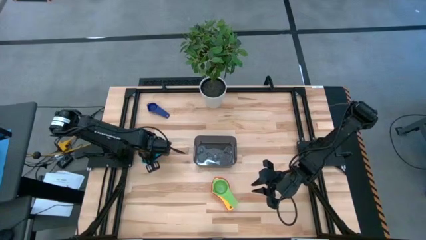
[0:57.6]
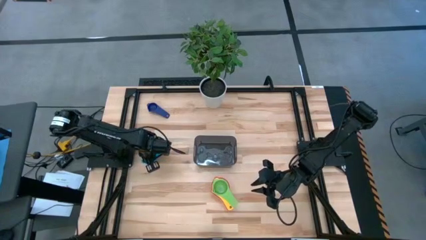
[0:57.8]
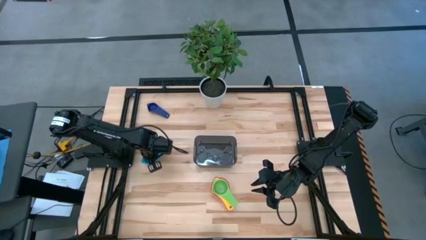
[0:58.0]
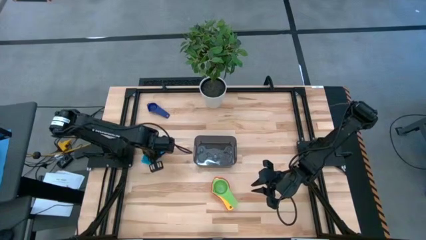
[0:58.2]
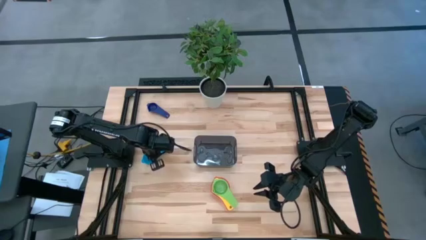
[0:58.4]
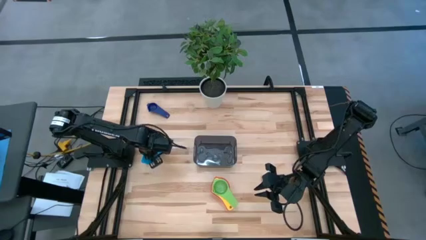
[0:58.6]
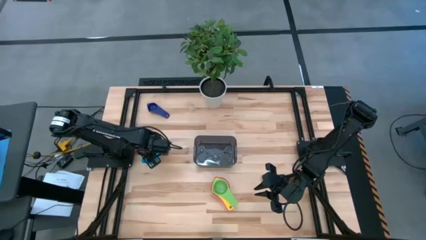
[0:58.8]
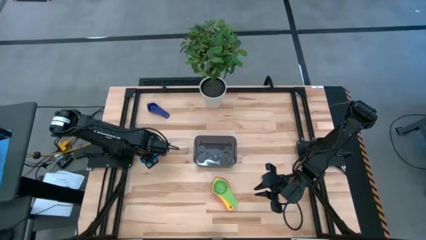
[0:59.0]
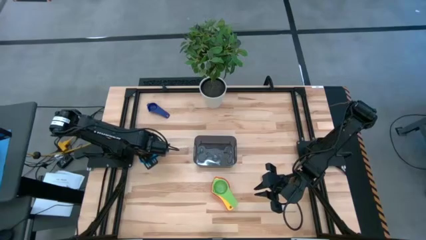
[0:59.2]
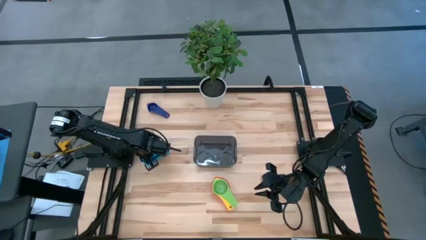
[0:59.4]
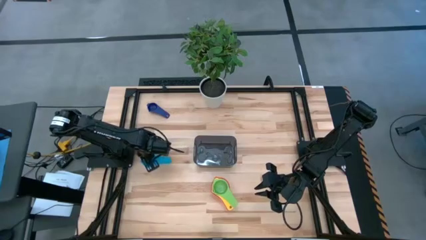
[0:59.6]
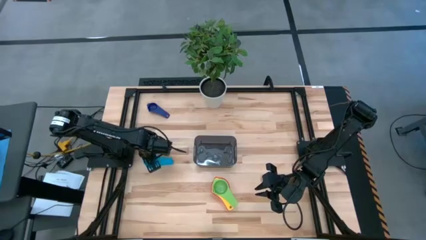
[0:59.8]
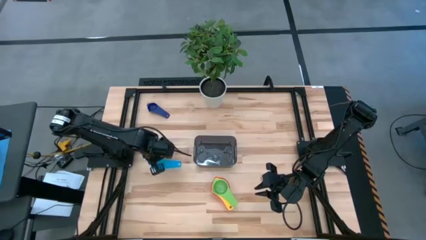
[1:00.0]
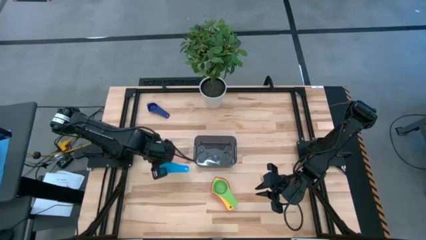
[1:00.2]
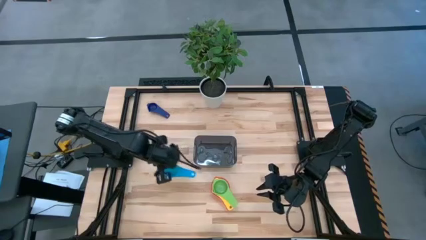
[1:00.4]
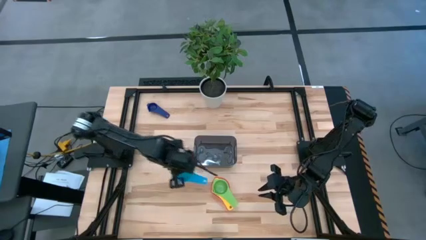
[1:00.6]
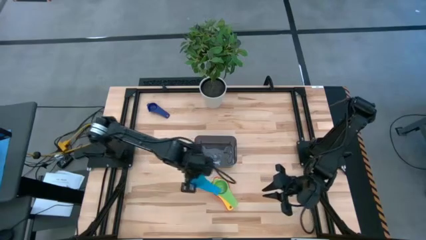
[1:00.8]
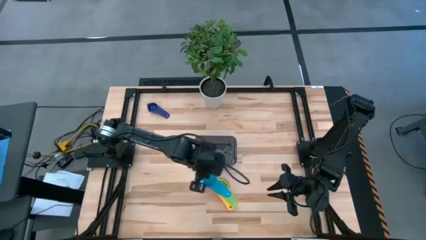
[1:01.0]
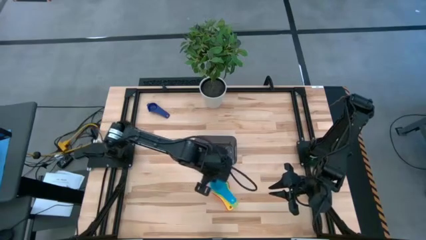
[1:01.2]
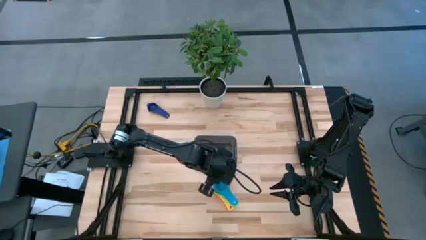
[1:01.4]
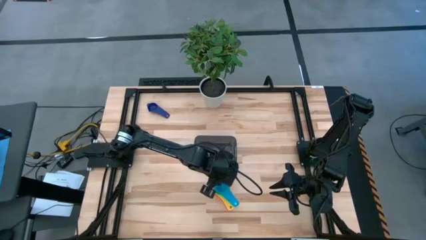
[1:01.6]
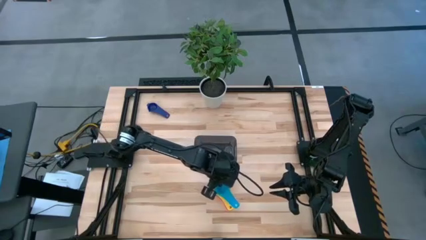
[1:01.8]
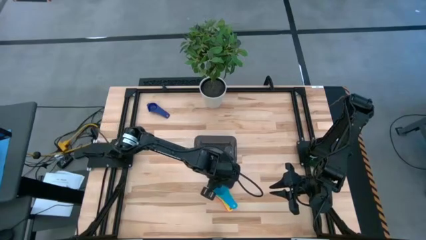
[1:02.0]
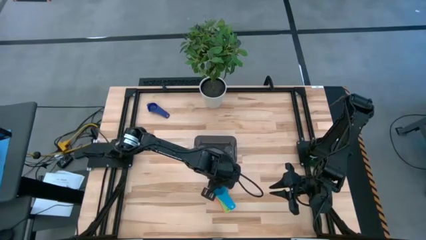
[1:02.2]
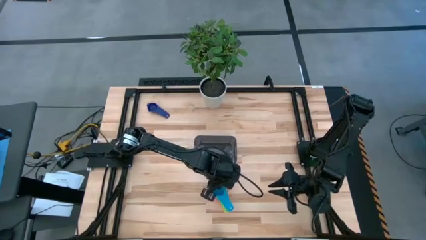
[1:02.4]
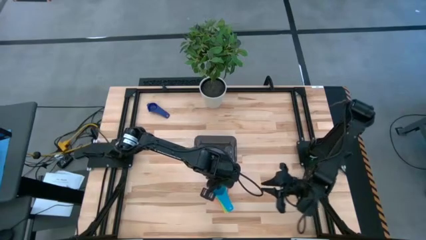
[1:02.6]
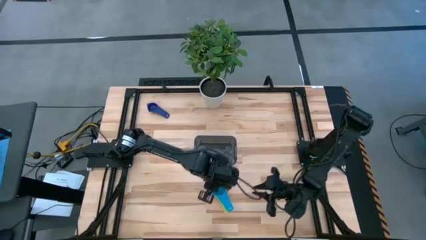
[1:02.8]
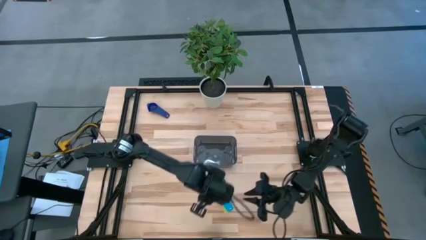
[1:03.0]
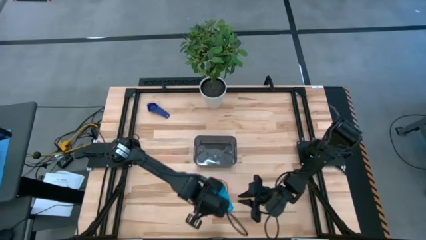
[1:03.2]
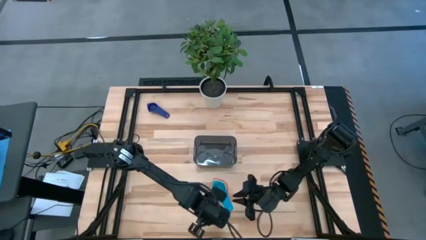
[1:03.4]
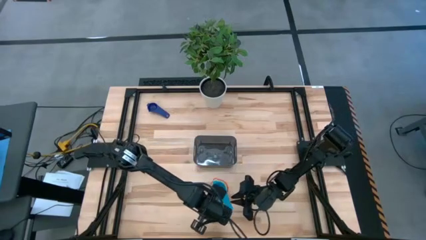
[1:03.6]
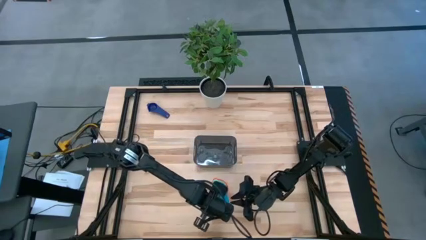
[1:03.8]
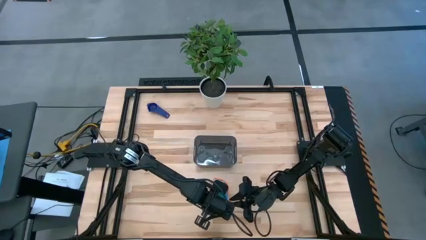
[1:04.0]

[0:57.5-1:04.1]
Task: Nest measuring cups in basket
Stack the light blue measuring cup on top of the green measuring cup

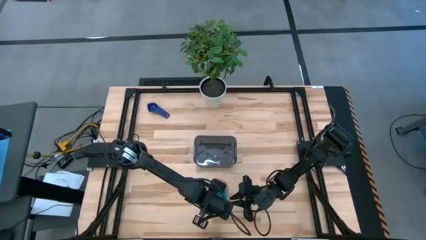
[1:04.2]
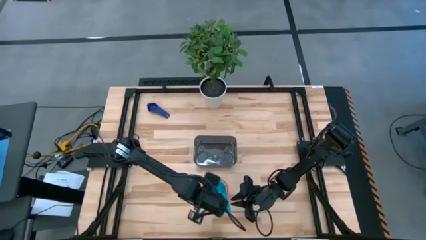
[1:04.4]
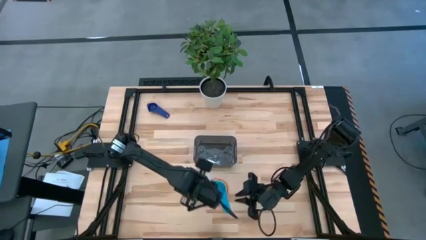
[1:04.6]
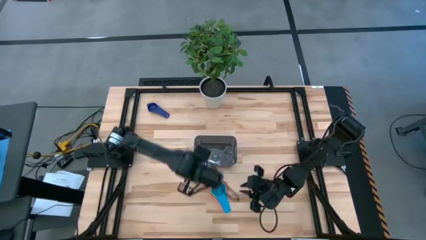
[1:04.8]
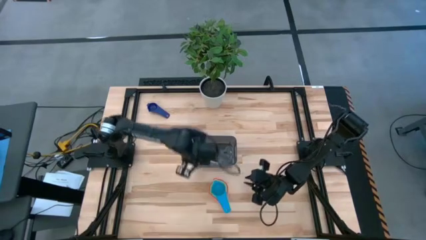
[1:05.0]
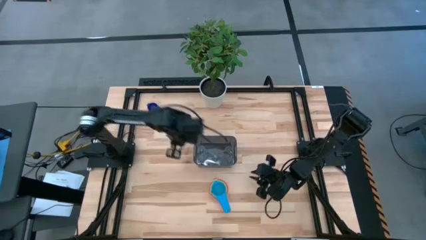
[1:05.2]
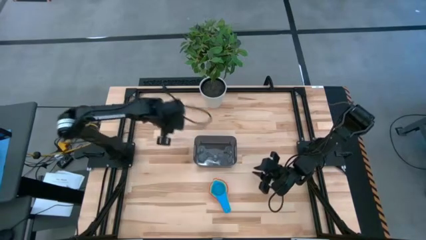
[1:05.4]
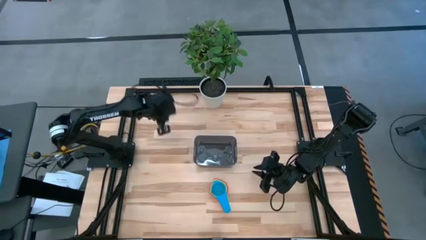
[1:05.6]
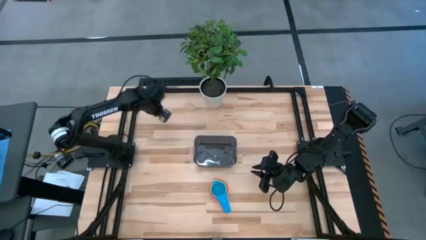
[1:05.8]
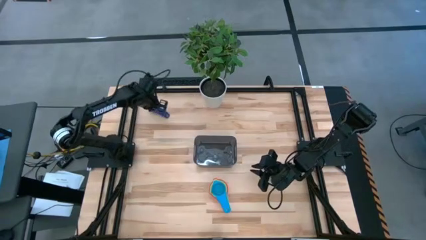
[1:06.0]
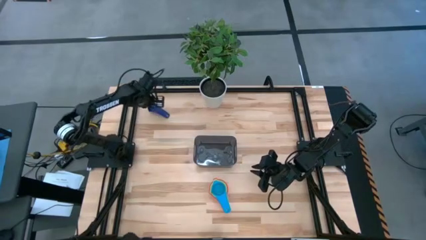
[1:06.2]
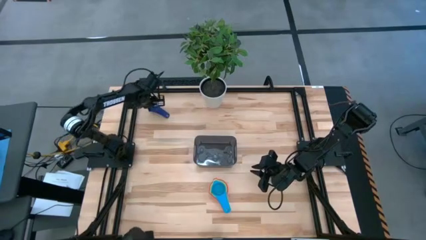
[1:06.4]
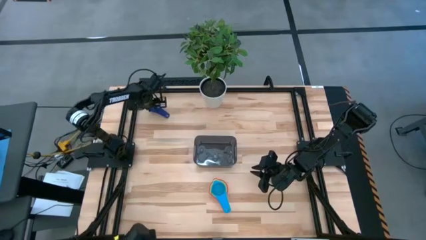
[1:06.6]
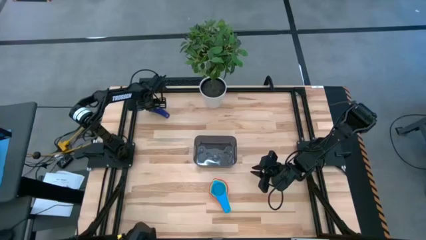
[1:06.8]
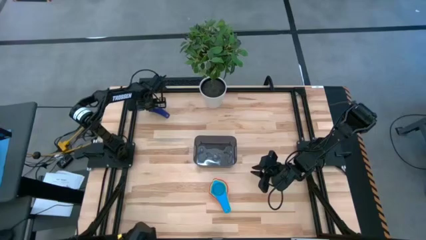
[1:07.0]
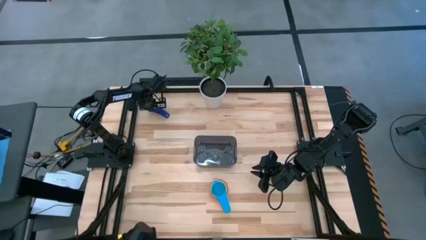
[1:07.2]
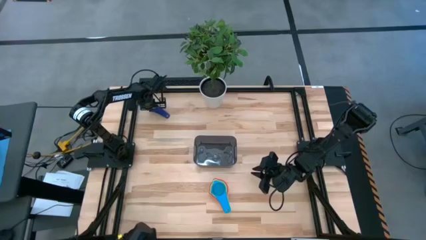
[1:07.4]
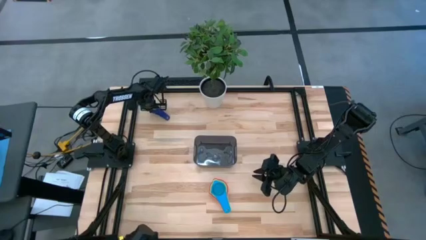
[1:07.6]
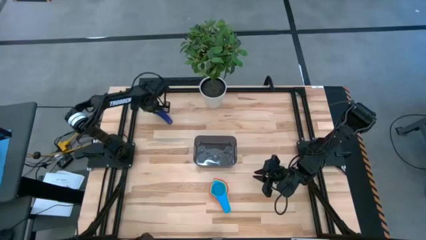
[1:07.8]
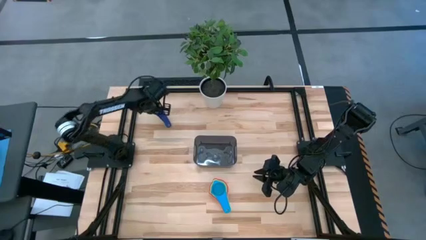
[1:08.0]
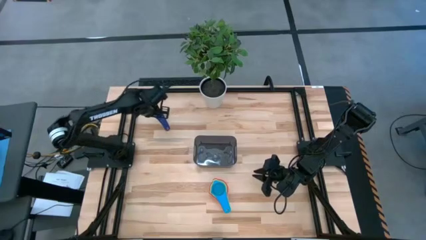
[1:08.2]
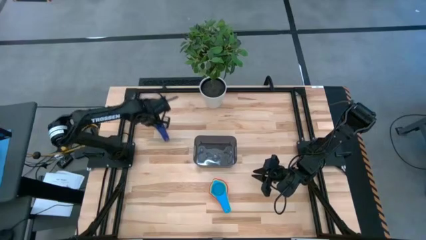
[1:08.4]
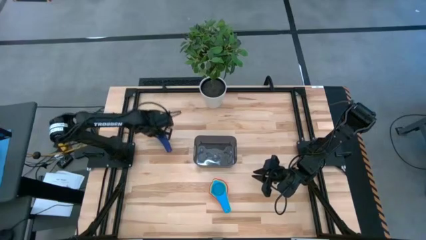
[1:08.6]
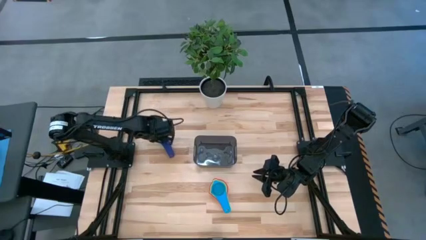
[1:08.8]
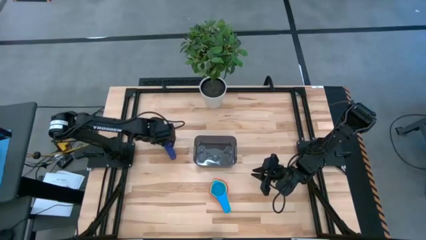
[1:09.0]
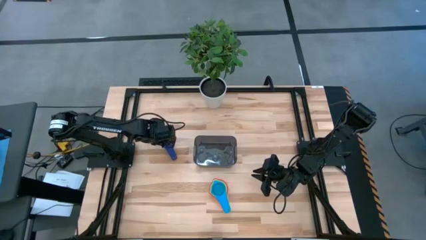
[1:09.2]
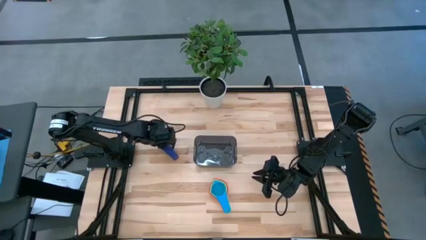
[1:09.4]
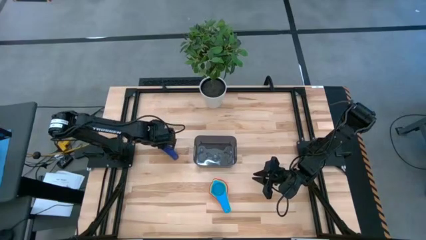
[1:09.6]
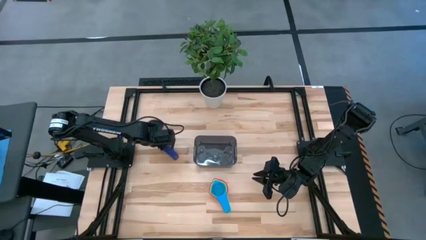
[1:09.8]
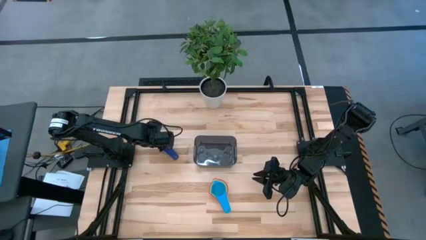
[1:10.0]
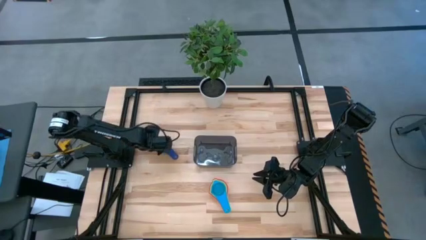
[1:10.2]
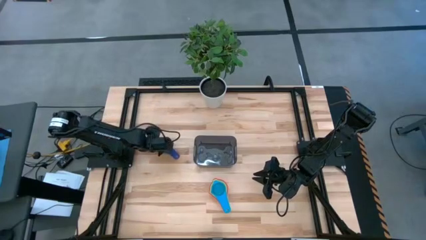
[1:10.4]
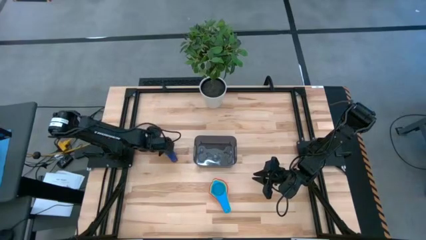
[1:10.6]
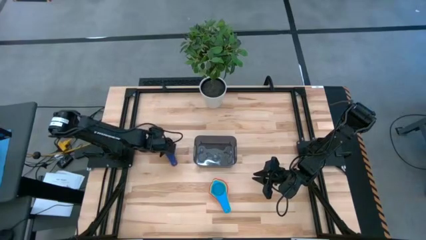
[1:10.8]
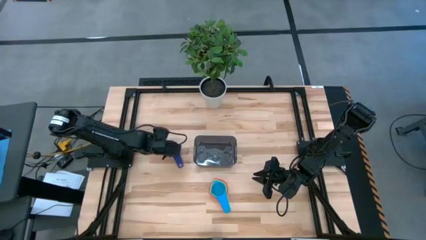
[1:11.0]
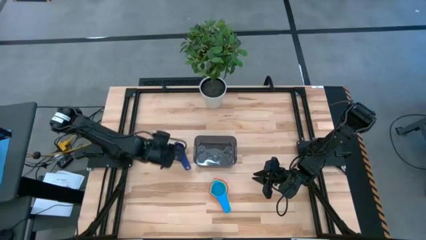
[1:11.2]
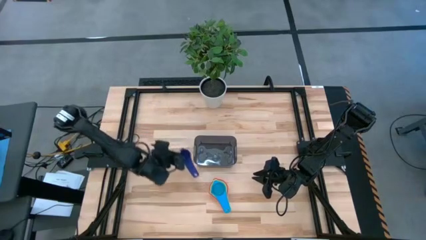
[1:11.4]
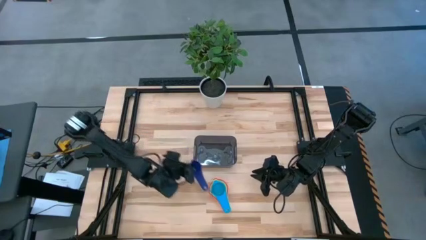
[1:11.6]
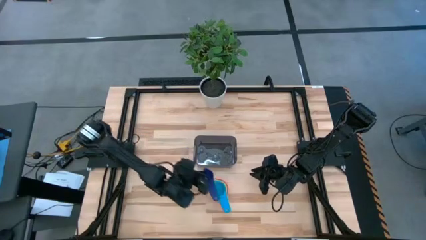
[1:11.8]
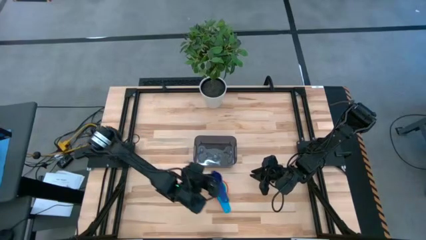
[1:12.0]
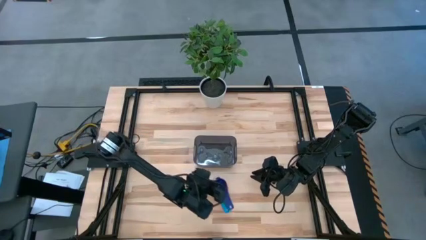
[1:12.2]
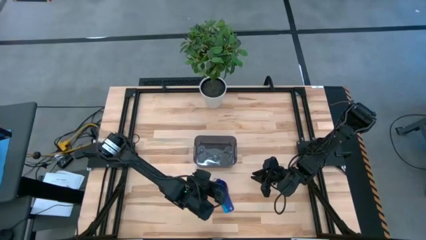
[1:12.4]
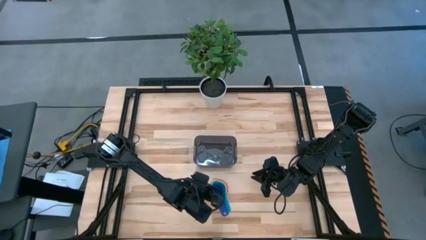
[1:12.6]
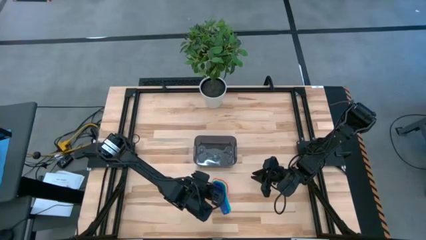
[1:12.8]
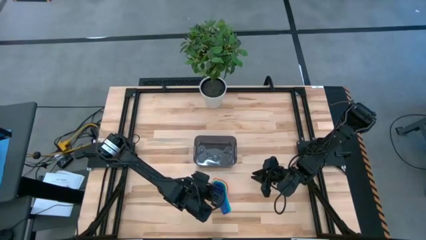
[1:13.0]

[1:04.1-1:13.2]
Stack the dark blue measuring cup on top of the light blue measuring cup

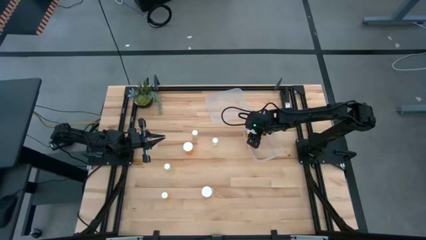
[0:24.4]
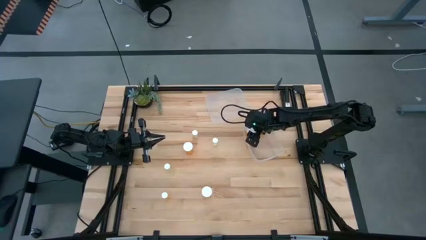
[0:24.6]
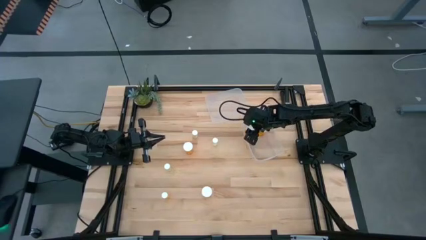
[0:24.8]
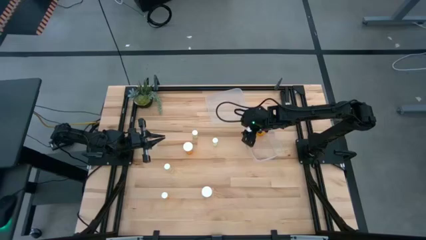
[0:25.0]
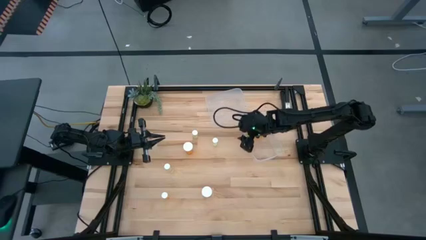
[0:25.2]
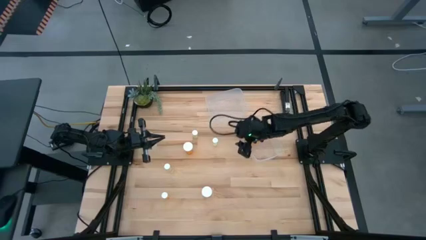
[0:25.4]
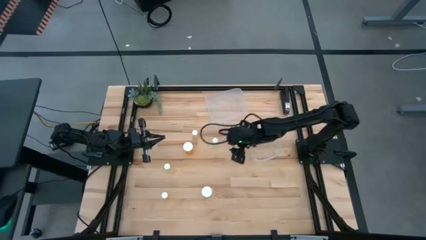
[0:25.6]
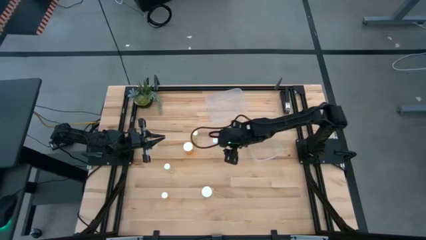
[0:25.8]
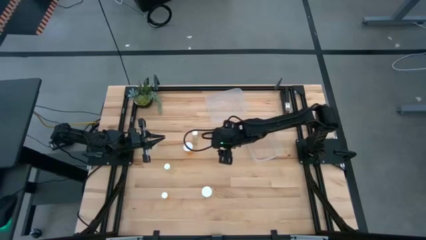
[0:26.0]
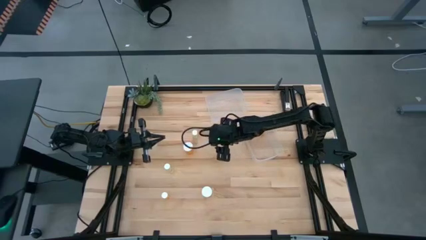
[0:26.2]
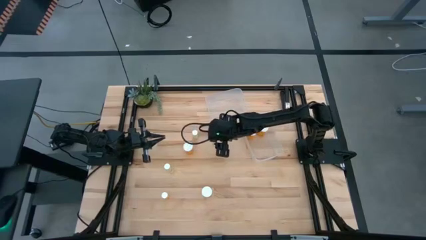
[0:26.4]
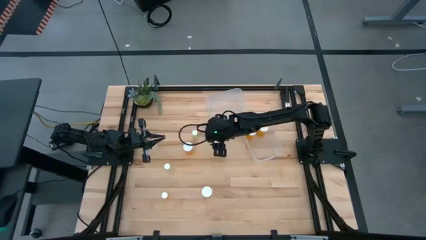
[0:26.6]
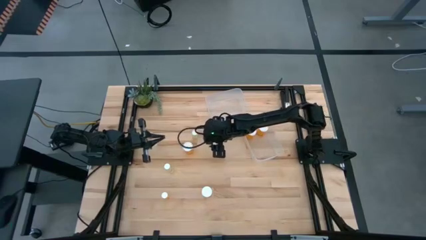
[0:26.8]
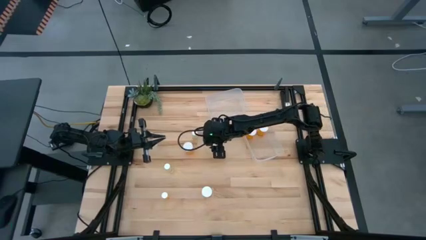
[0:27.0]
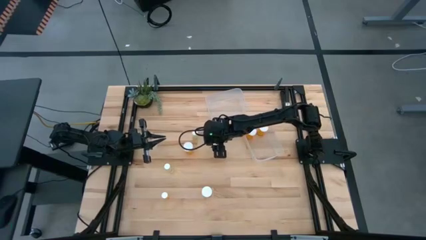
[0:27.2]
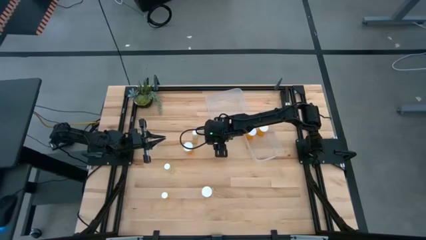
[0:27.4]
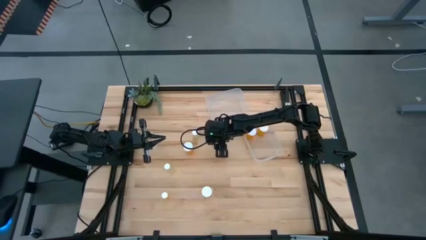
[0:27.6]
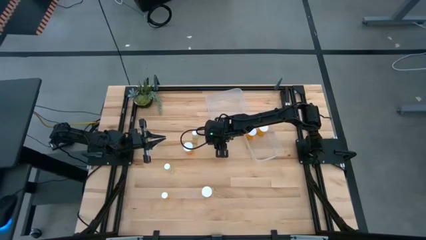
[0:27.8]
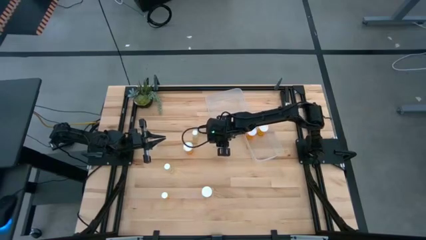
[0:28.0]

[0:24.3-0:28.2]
Task: Pick and place medicine bottles into bin by pill shape (circle, oval)
Put the top right small yellow pill bottle into the top transparent bin
